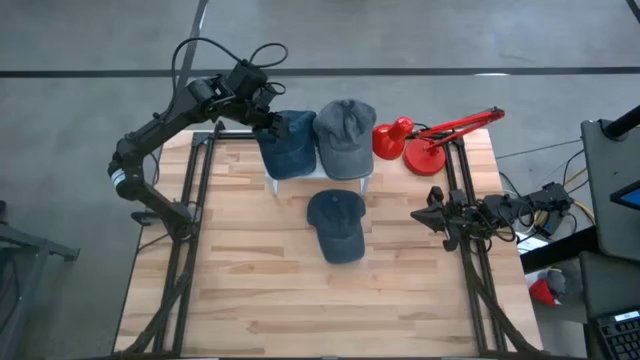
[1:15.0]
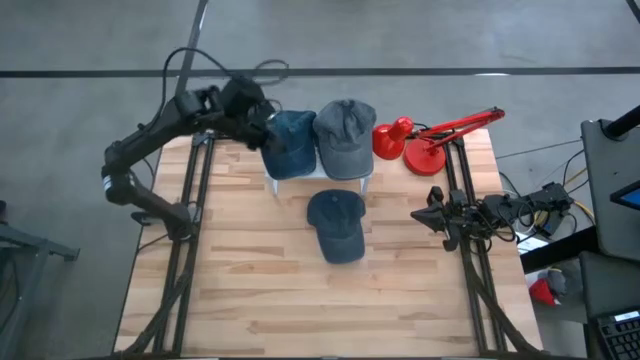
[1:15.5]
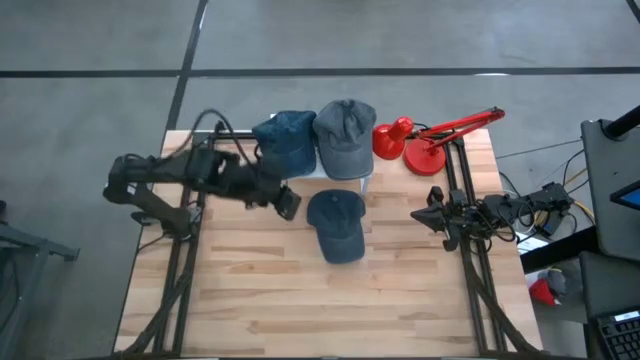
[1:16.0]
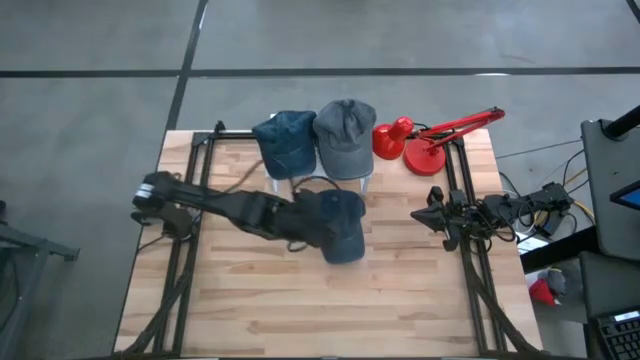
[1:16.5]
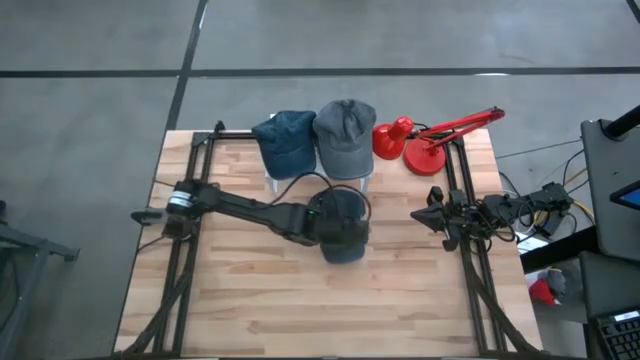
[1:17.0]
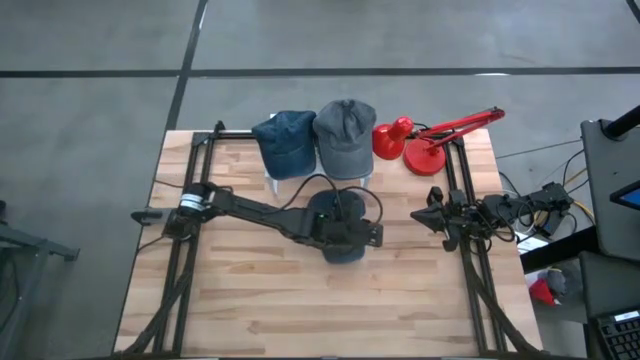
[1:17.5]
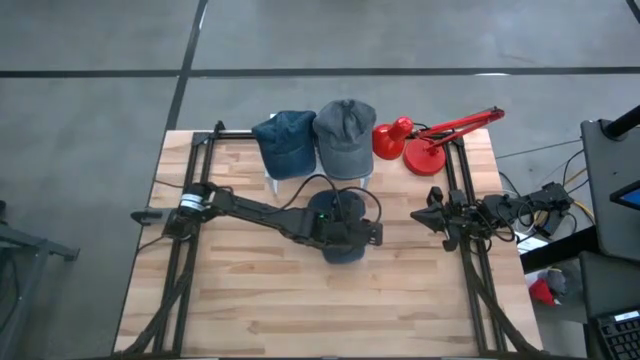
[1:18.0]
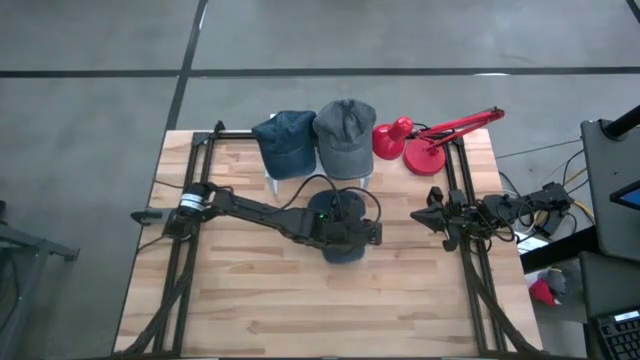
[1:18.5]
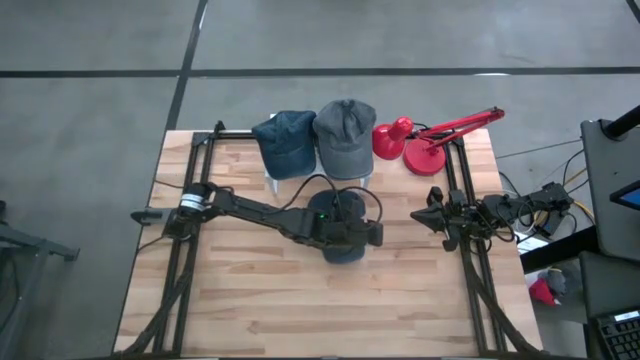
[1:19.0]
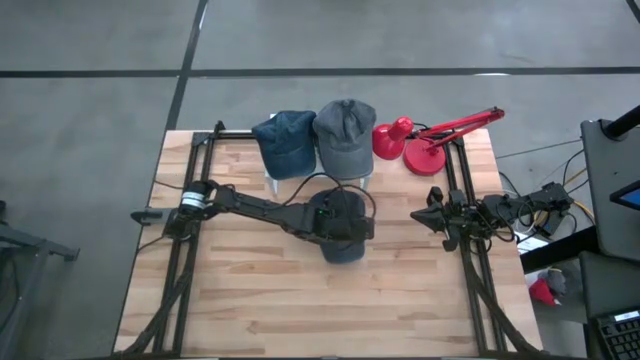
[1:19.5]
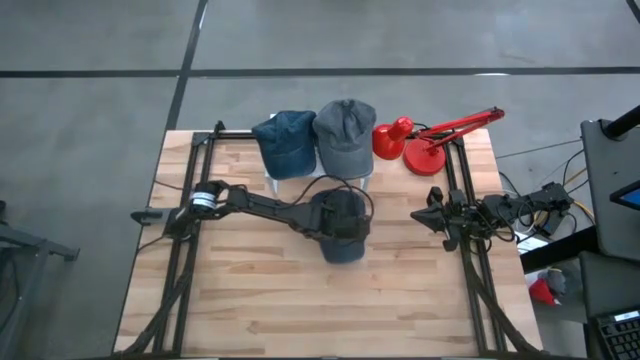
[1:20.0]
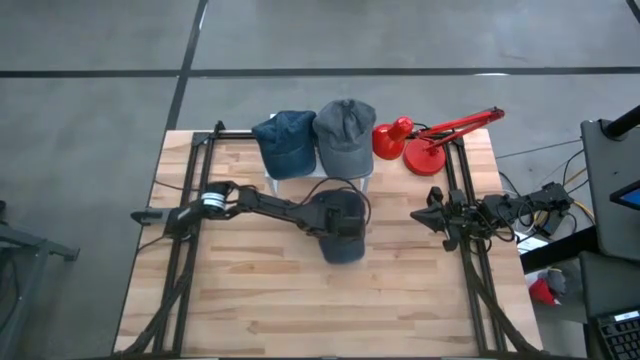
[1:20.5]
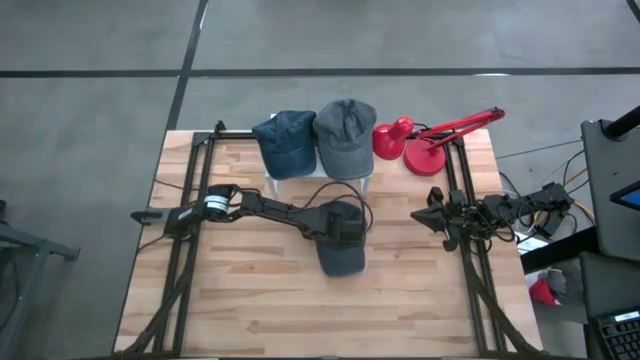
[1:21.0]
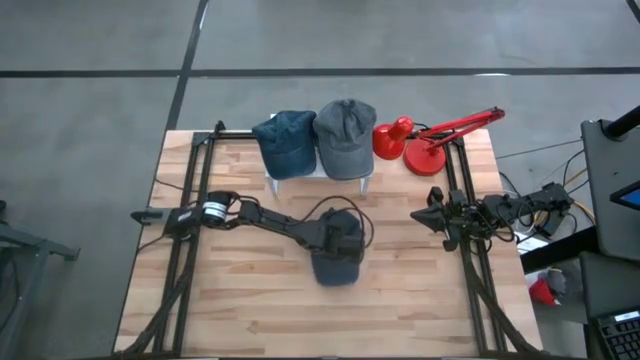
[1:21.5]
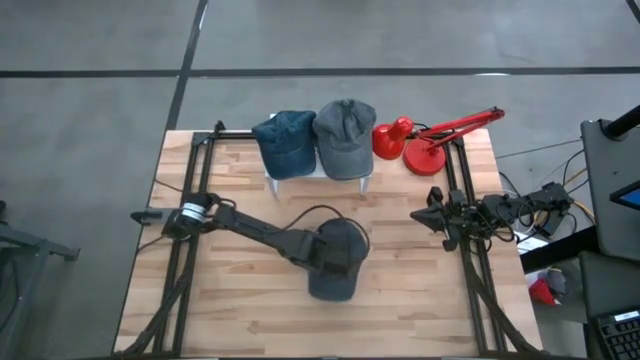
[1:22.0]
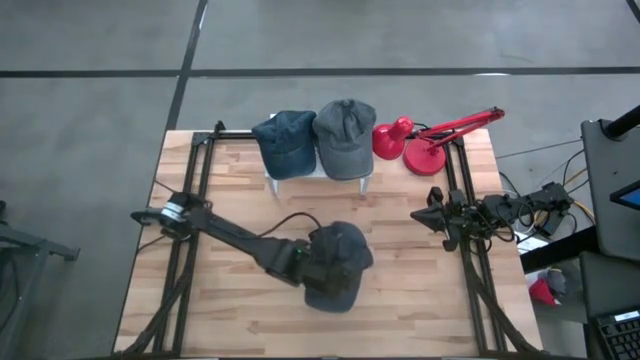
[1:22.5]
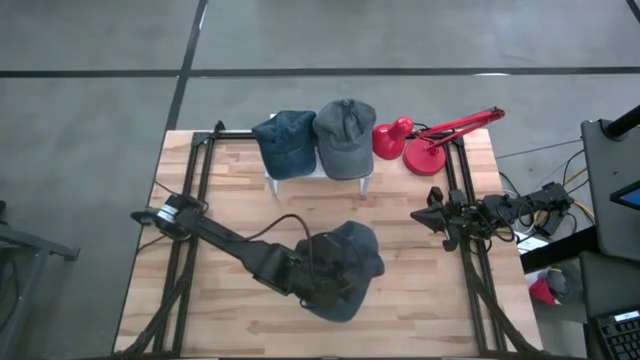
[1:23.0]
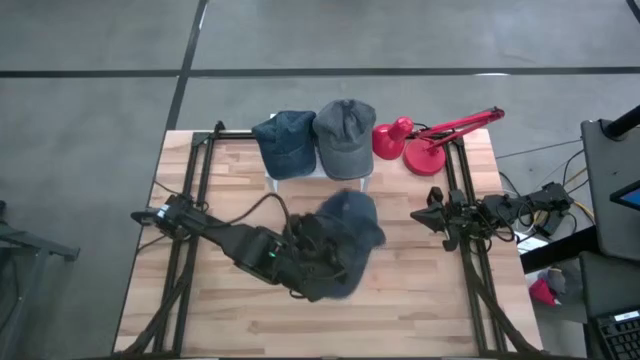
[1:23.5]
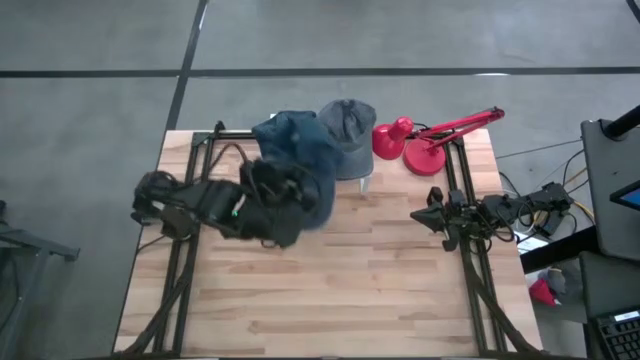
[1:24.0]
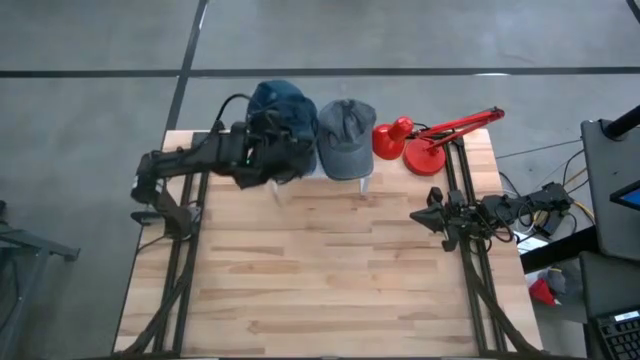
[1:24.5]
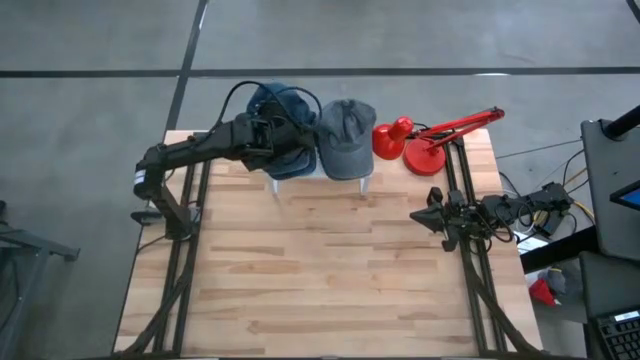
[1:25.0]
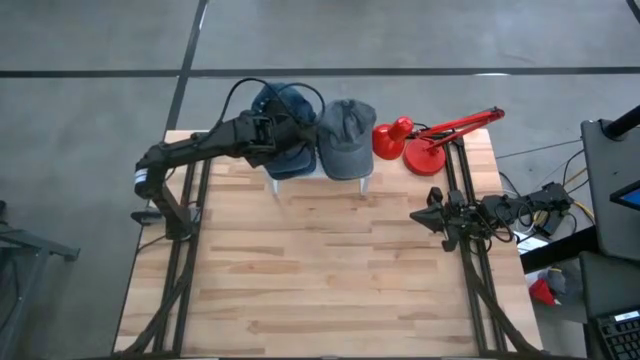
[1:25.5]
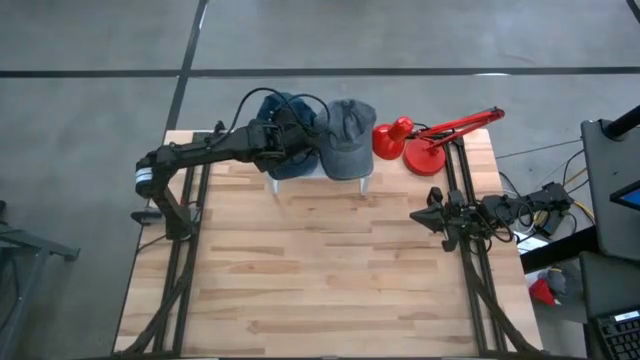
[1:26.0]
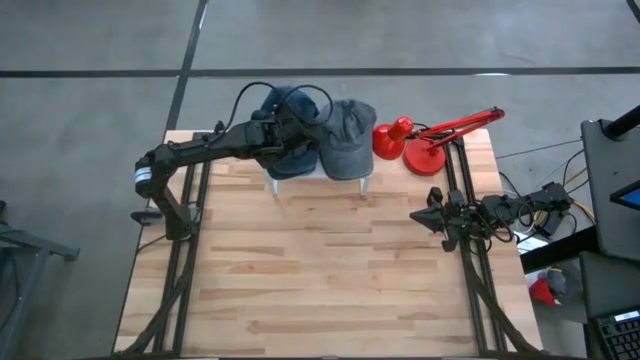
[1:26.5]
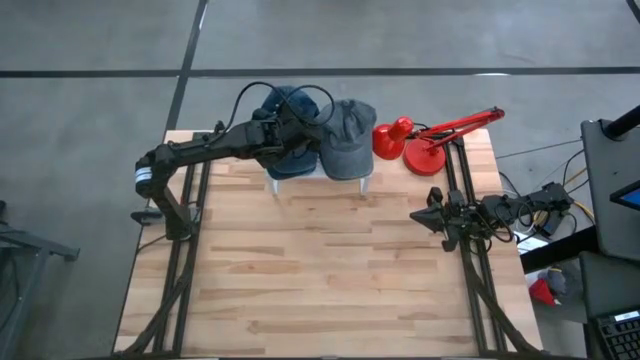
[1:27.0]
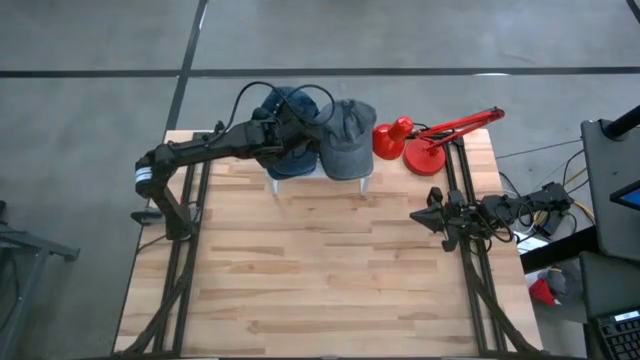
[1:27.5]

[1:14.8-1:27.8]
Task: Pick & Place hat
Put the blue cap on the shelf

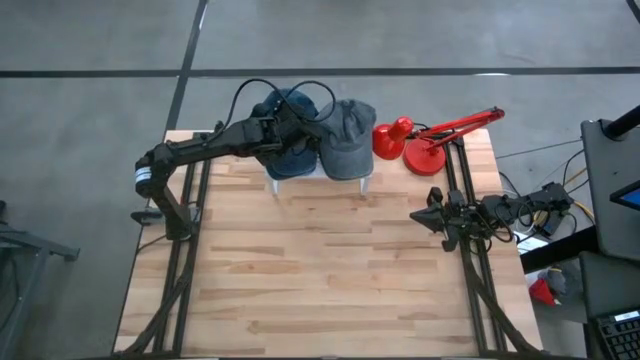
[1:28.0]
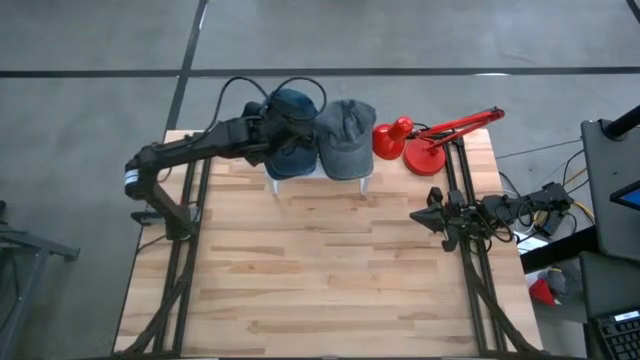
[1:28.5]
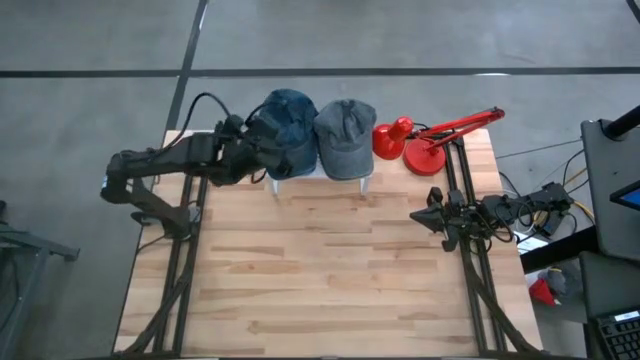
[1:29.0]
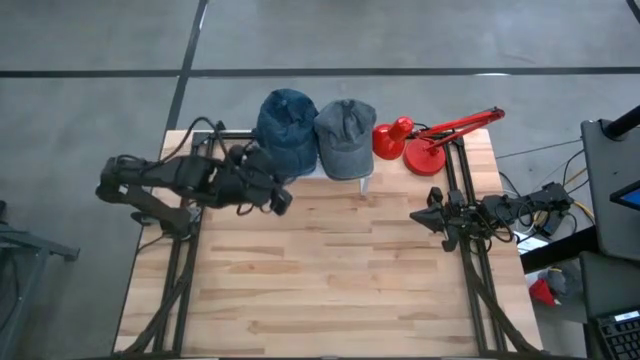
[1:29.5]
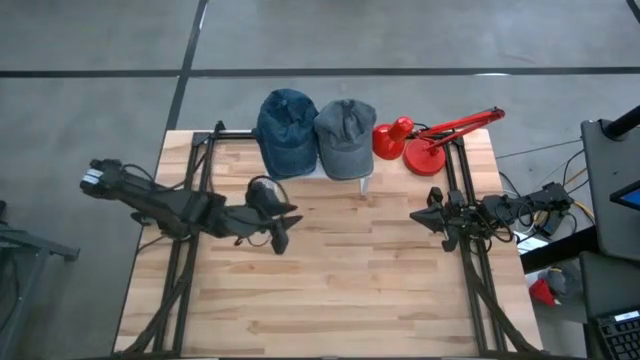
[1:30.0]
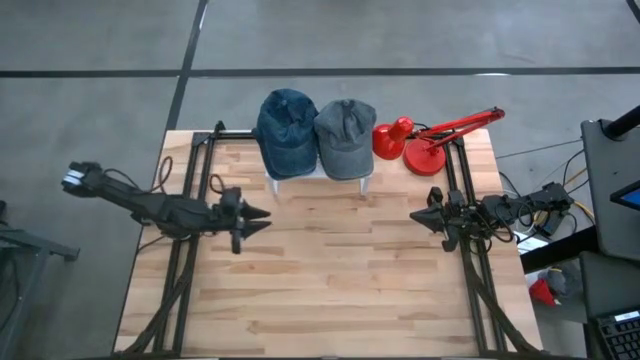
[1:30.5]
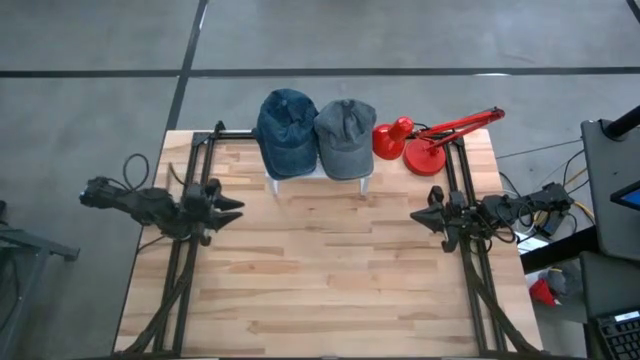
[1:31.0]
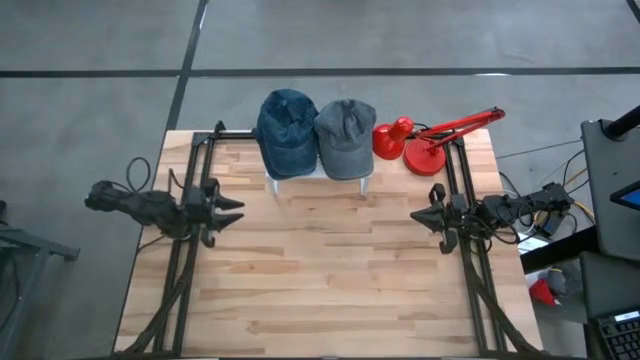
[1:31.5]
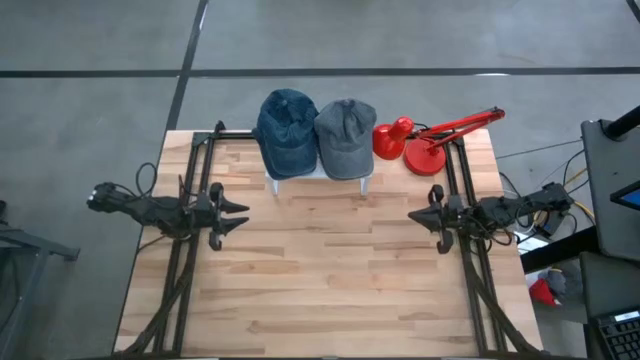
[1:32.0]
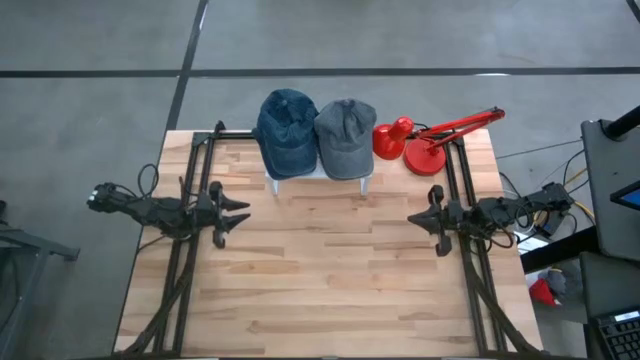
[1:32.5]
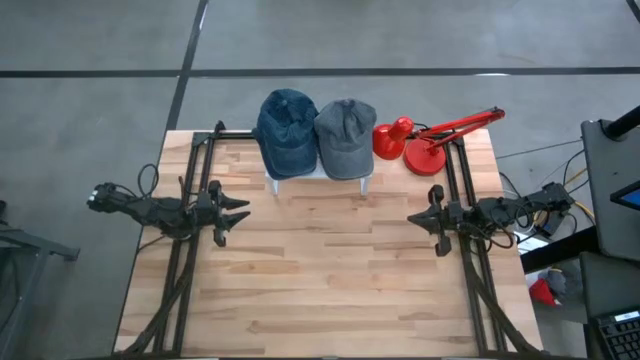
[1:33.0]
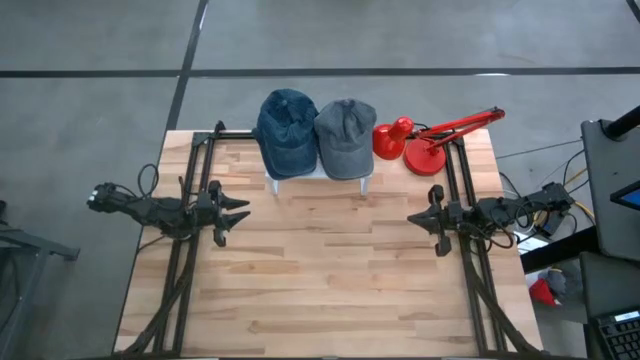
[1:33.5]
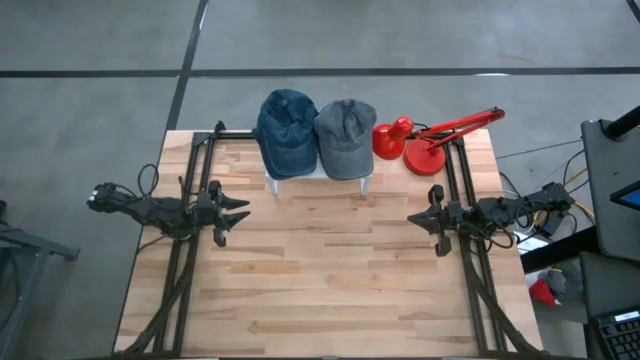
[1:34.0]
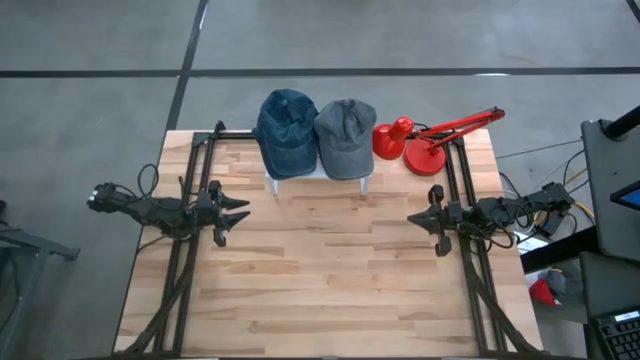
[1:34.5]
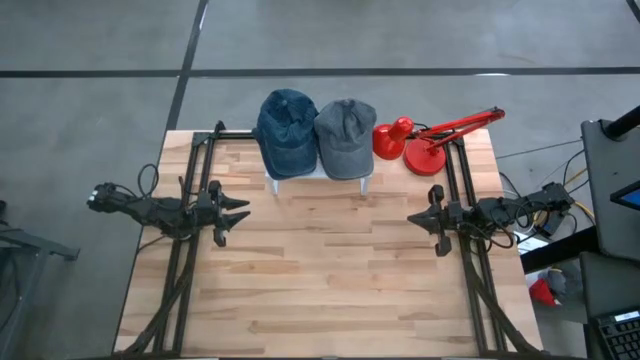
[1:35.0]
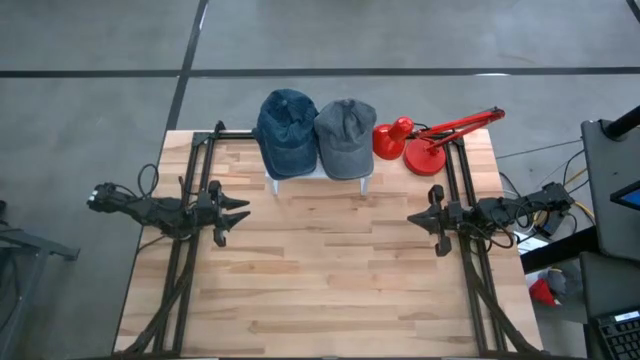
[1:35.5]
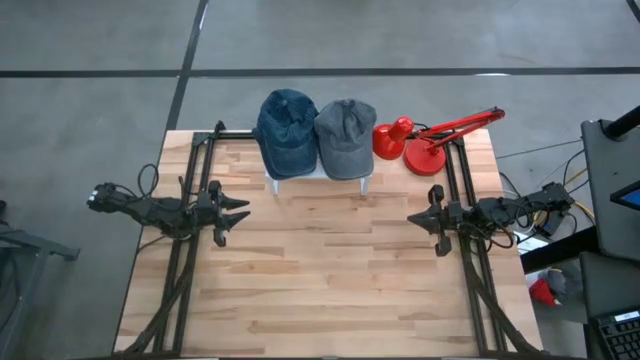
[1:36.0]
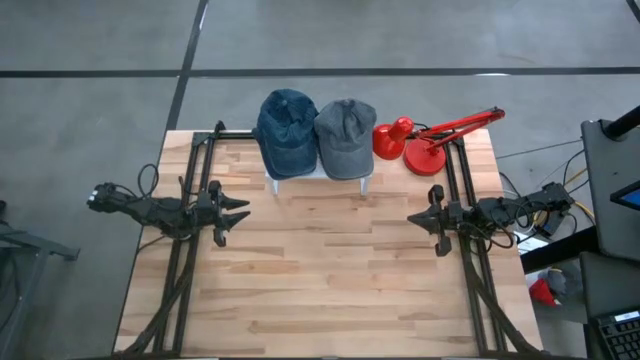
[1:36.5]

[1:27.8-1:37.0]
Return to Home Position
